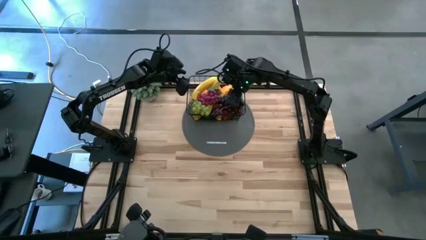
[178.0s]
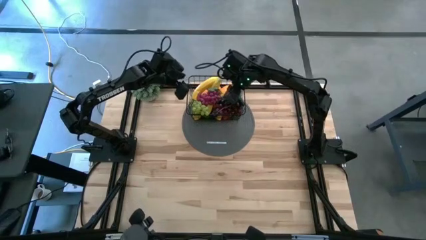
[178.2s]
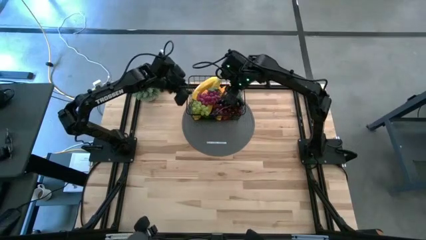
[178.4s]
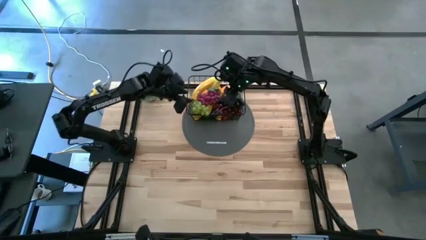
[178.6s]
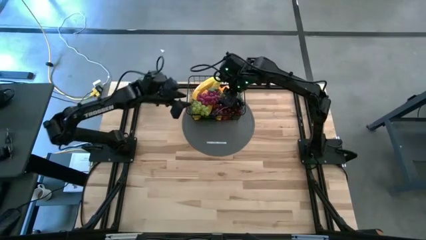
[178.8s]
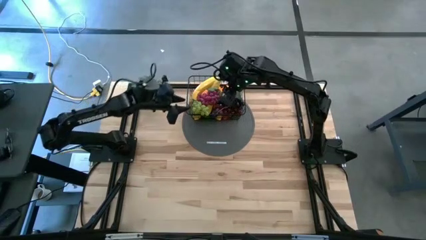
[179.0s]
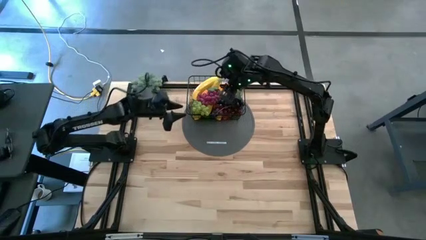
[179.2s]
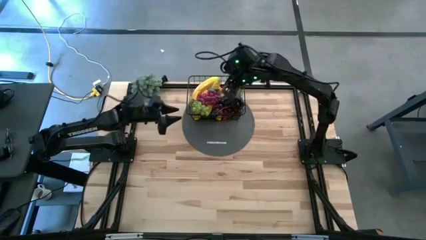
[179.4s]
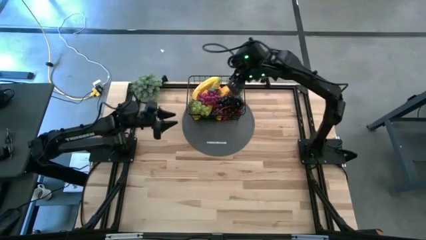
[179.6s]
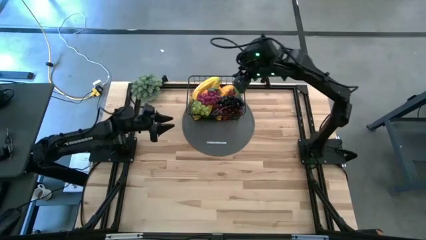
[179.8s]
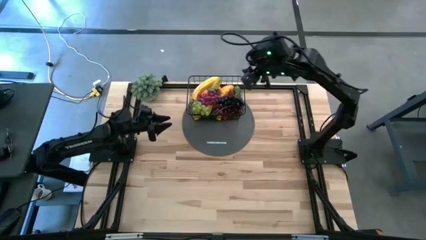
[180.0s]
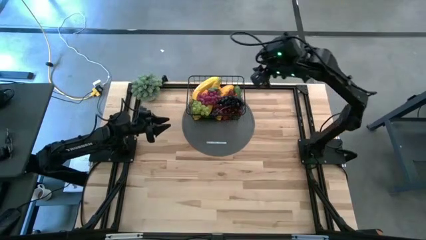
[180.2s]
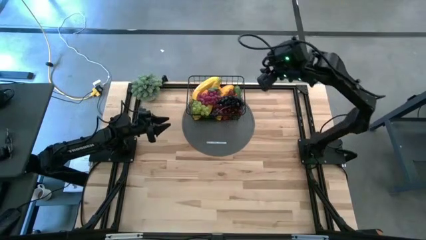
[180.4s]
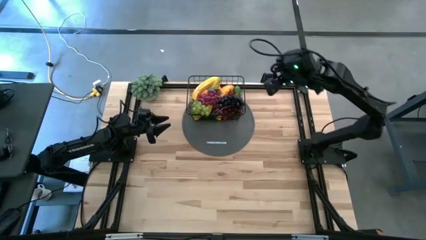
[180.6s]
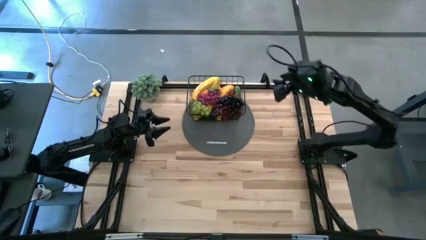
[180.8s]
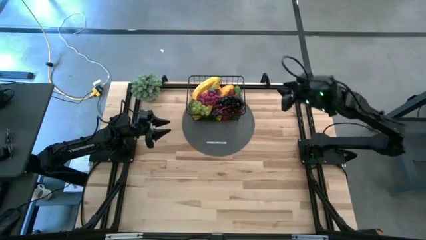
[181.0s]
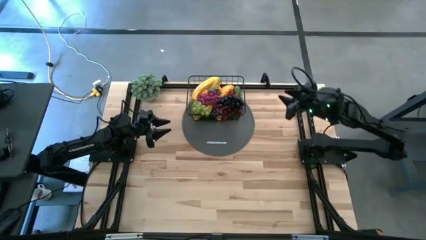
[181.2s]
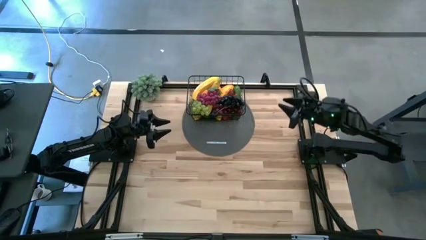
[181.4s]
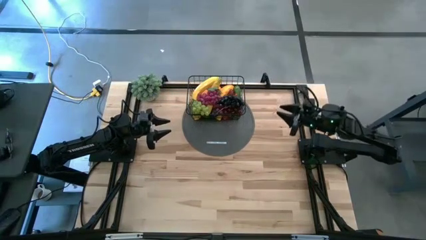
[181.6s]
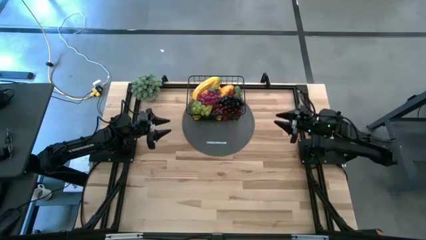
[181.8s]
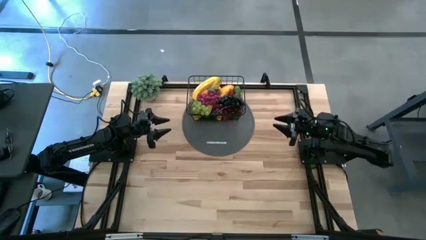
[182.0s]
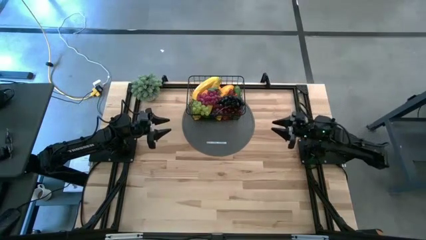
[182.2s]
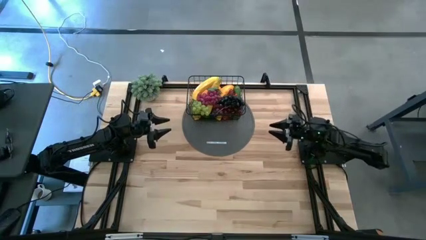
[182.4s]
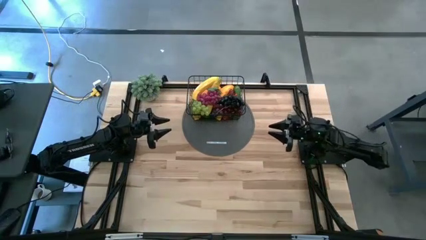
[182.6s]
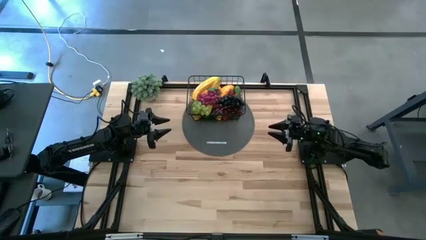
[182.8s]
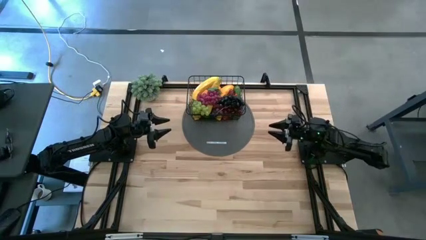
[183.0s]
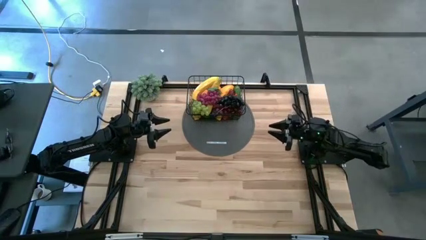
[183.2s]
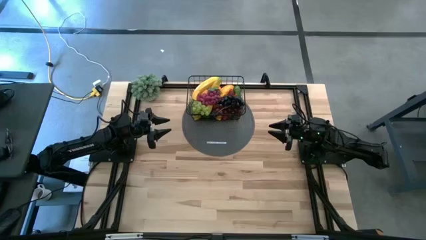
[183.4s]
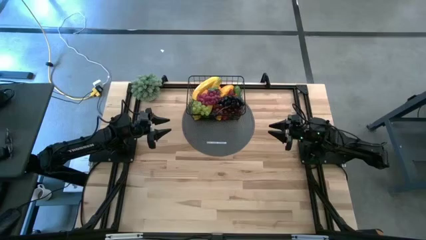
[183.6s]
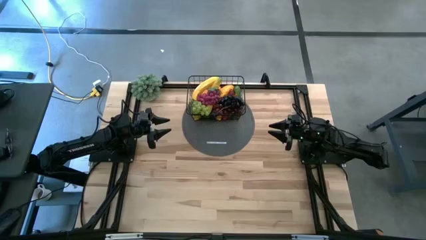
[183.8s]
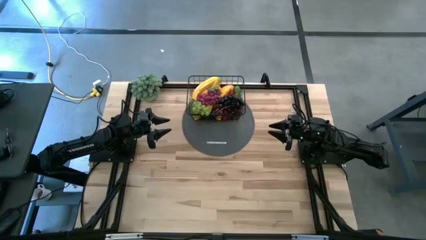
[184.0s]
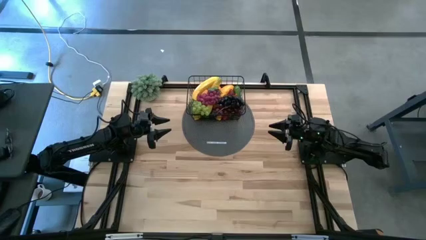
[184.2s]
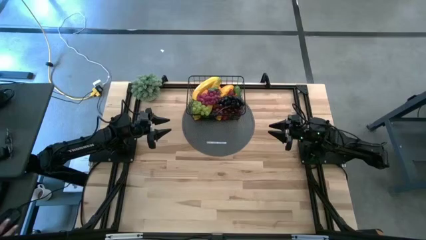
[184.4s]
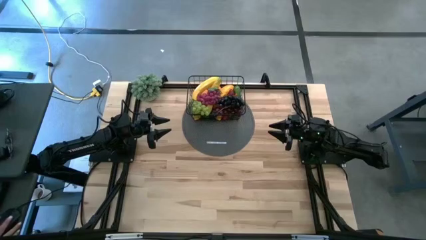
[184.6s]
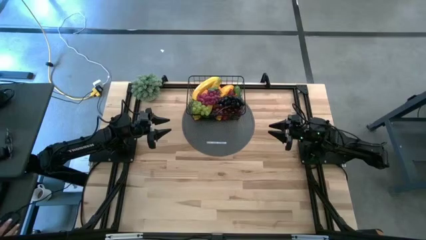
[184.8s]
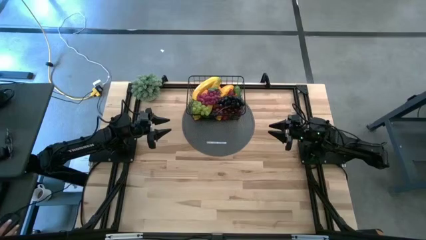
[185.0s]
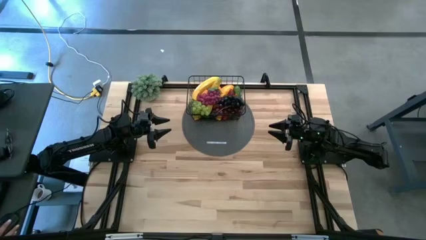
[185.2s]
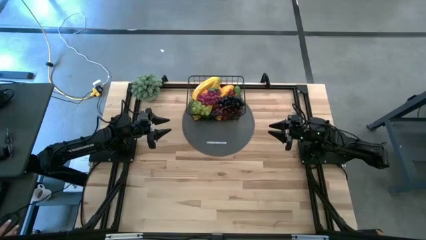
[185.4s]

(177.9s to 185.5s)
Task: Build produce basket
Return to Home Position

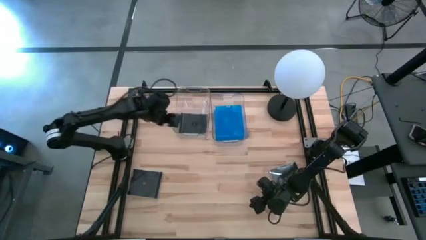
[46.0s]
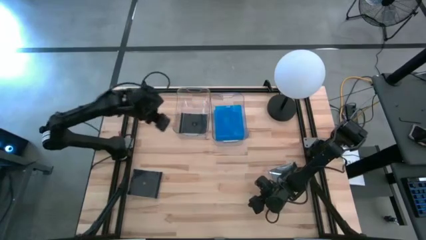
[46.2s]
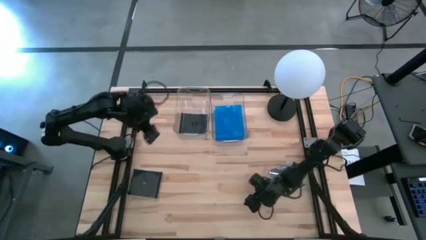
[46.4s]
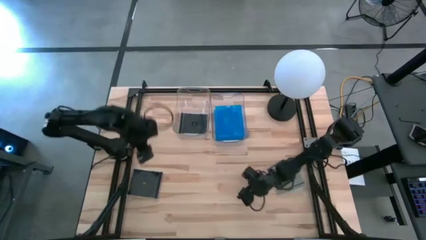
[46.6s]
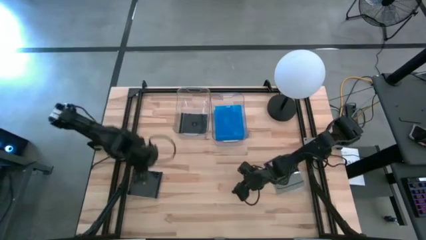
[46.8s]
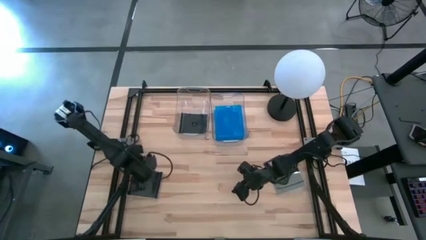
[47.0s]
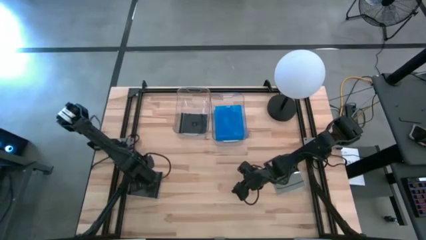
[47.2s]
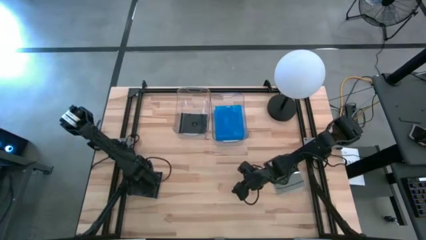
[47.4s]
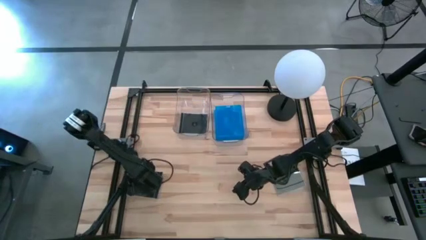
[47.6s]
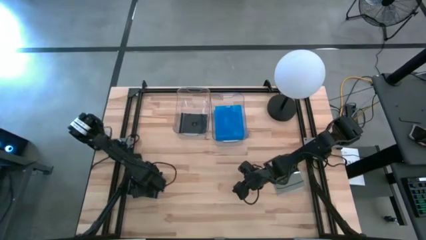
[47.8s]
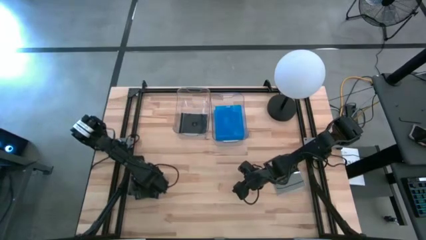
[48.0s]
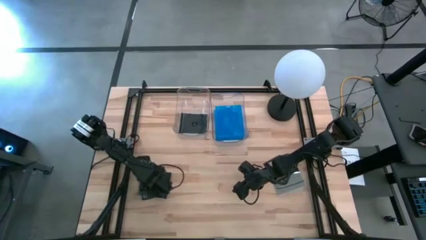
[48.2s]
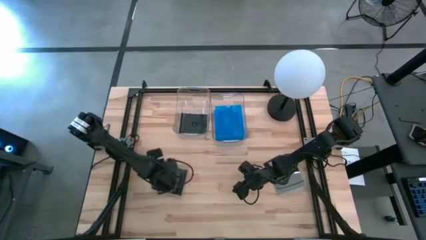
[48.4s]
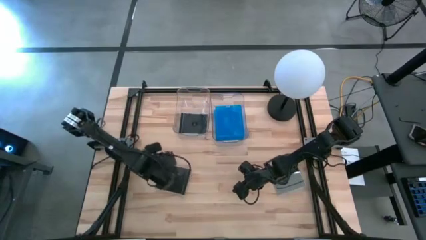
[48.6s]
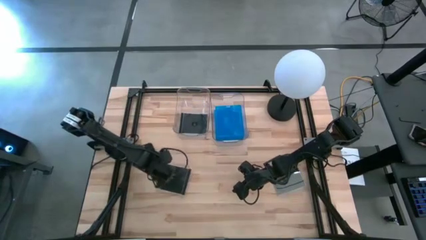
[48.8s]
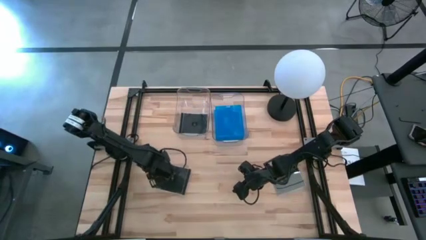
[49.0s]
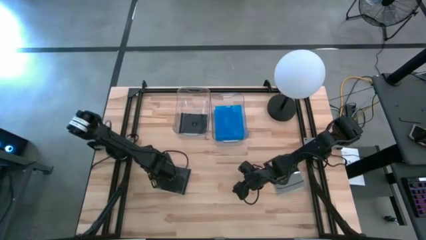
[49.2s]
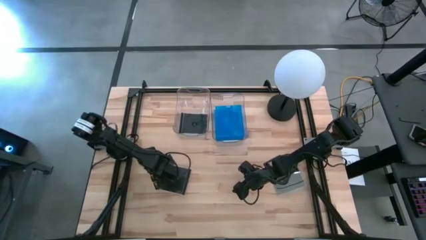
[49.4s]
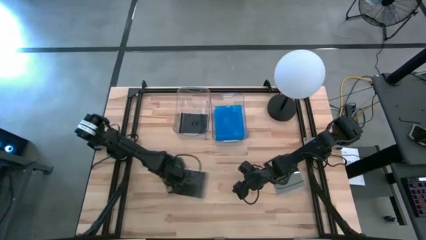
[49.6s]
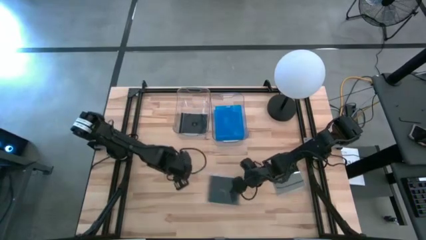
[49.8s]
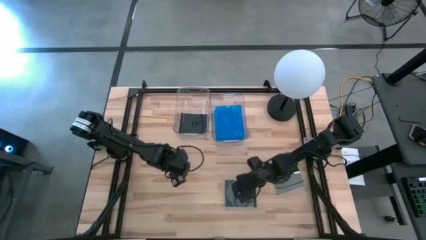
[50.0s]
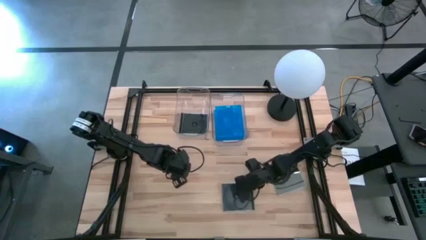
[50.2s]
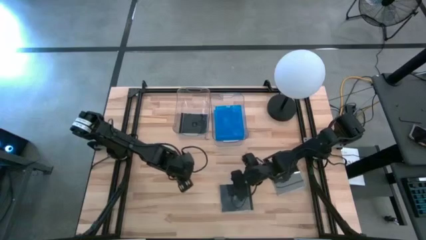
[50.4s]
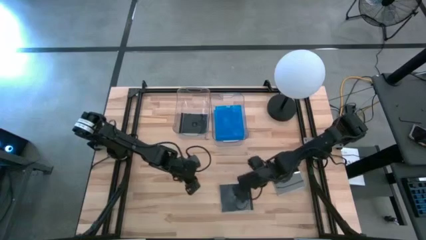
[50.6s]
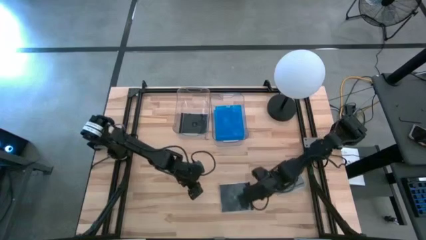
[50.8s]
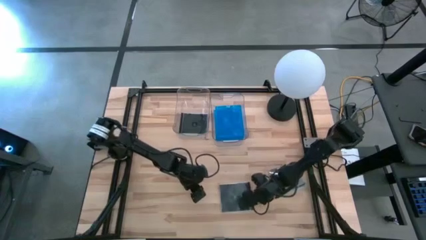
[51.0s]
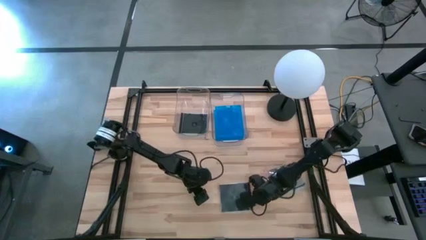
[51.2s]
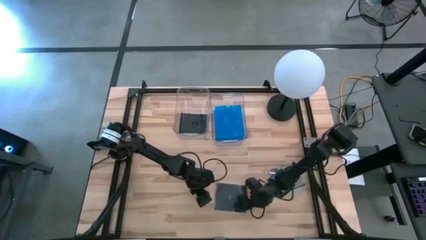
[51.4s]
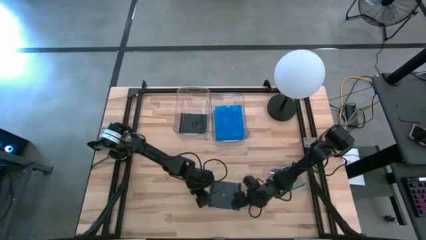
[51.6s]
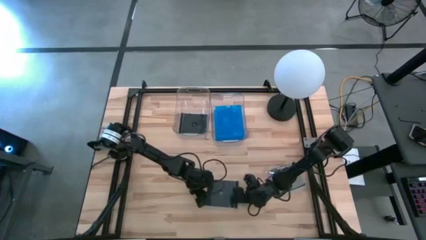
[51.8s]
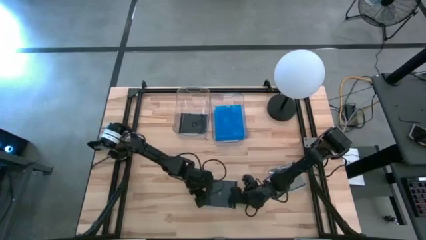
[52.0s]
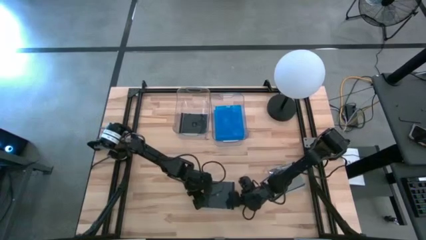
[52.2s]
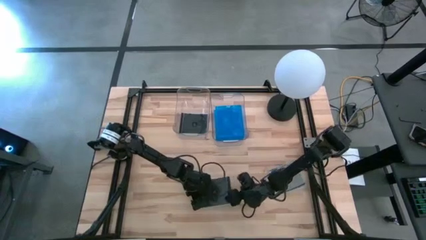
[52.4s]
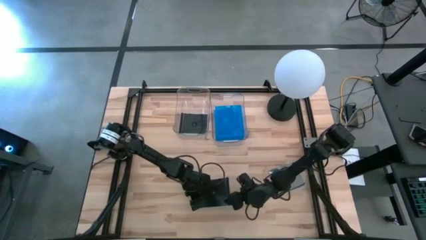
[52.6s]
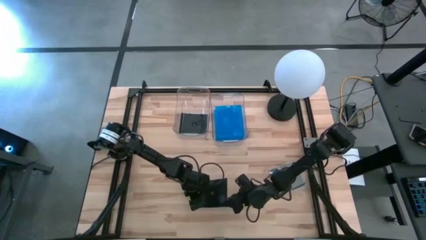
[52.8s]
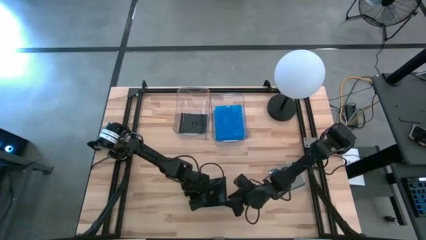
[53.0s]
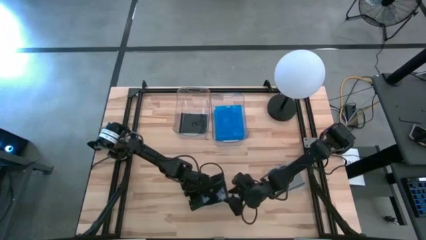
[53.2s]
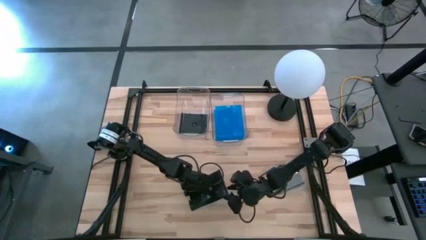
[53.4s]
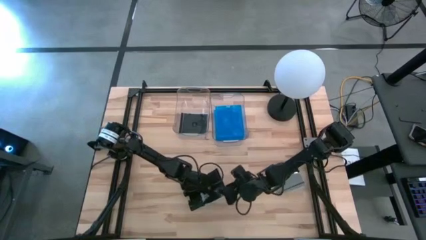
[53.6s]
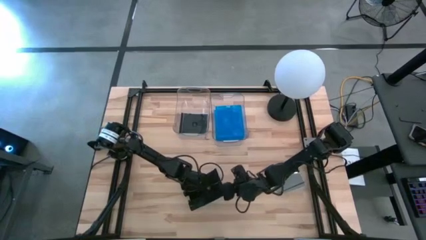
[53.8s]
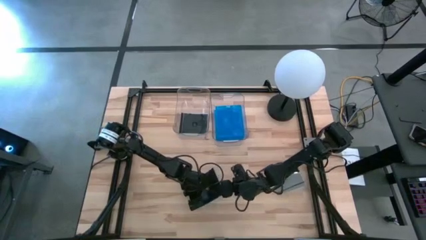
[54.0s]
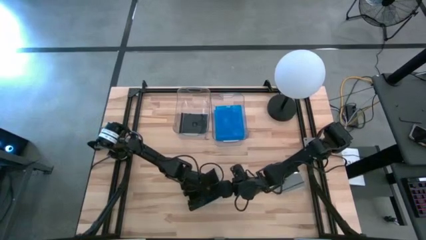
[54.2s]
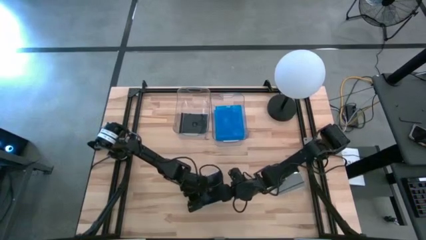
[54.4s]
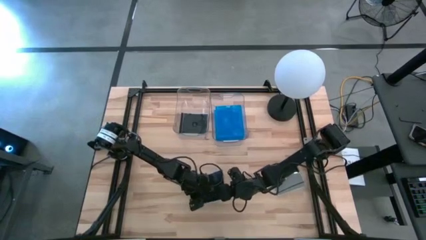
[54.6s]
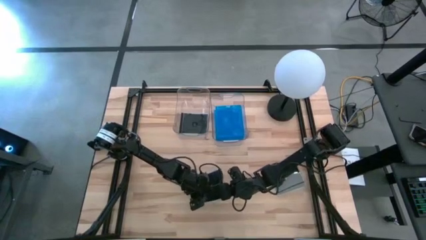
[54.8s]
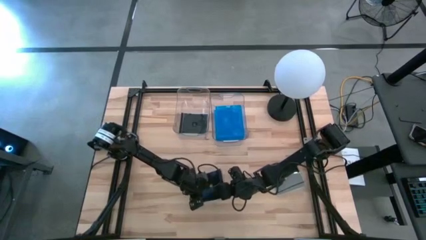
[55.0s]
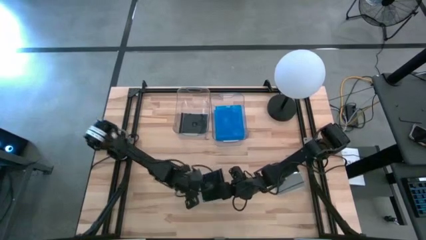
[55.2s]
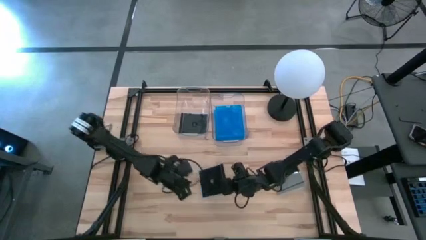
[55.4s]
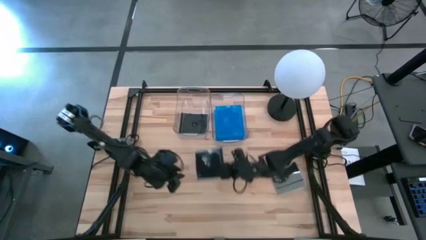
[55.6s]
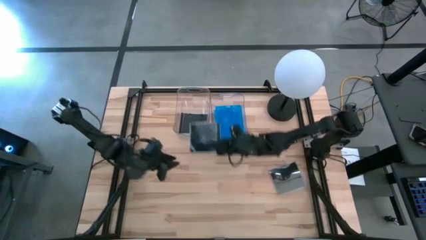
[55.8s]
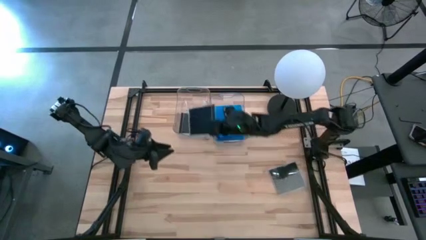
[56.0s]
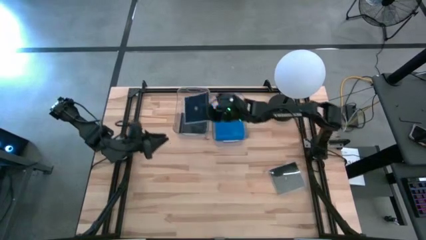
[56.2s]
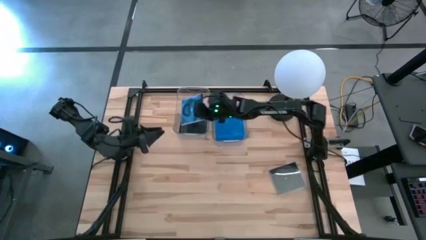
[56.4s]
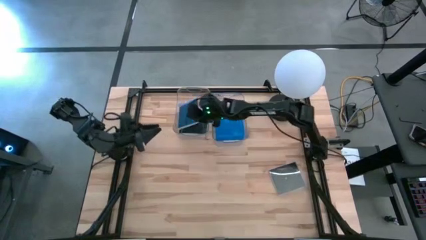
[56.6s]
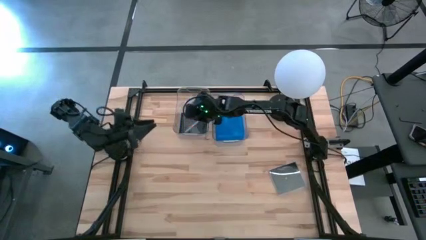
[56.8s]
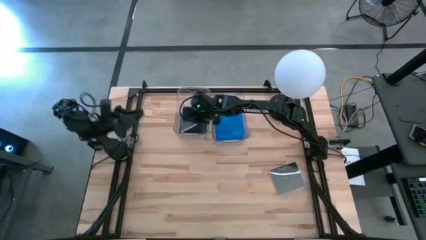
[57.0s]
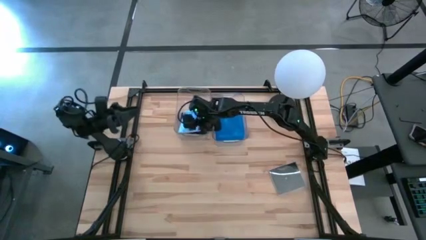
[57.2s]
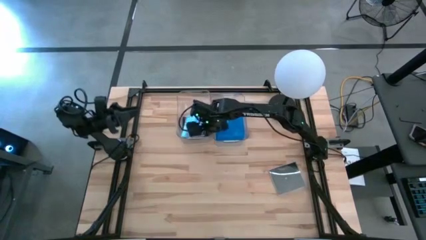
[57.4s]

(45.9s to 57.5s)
Task: Pick & place jewel cases by type
Put the left black CD case into the left transparent bin
